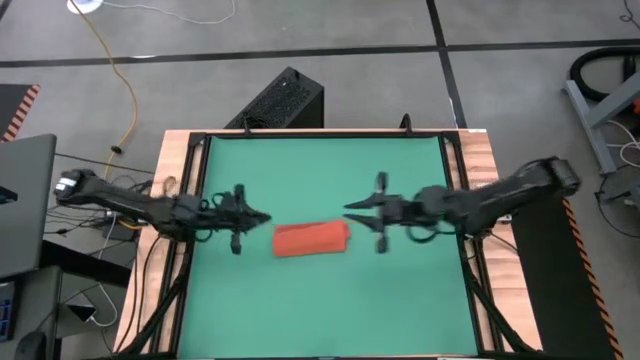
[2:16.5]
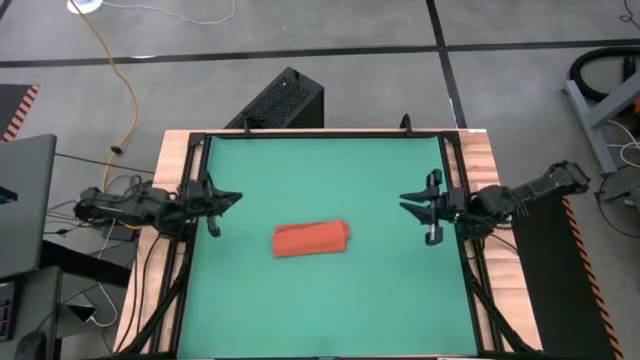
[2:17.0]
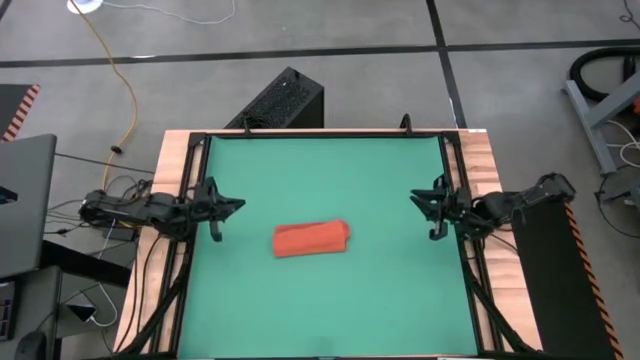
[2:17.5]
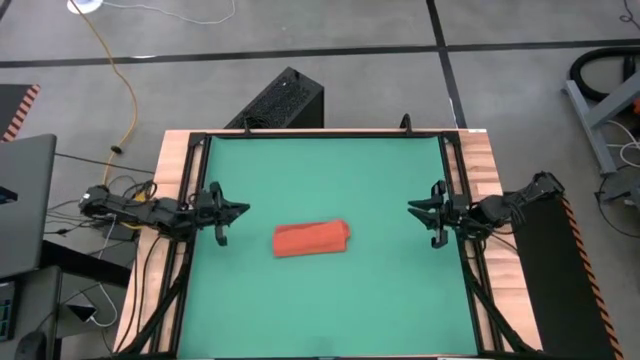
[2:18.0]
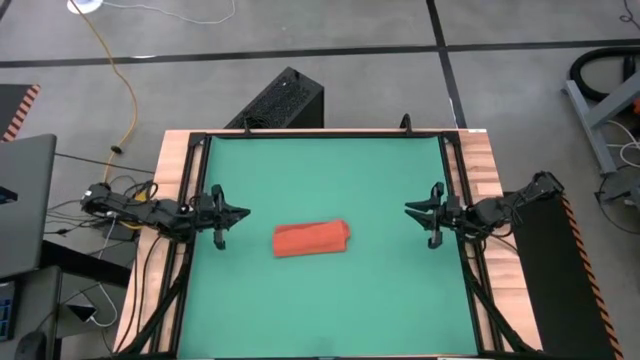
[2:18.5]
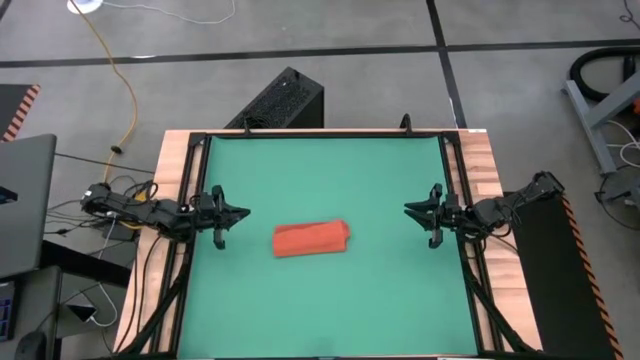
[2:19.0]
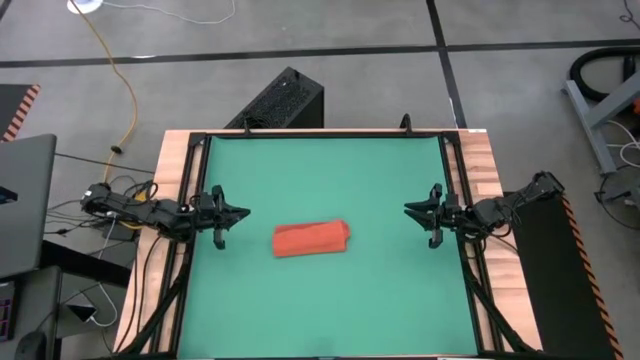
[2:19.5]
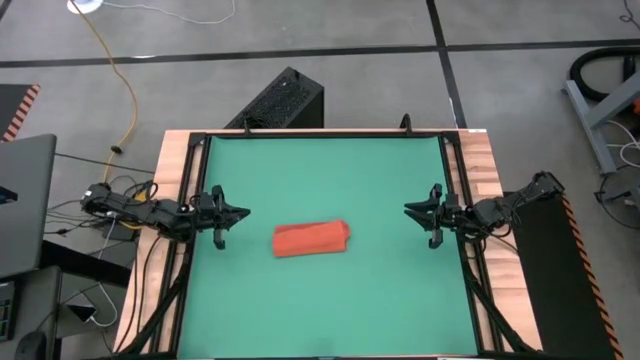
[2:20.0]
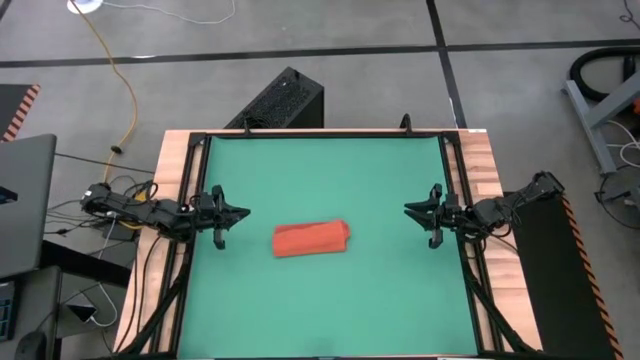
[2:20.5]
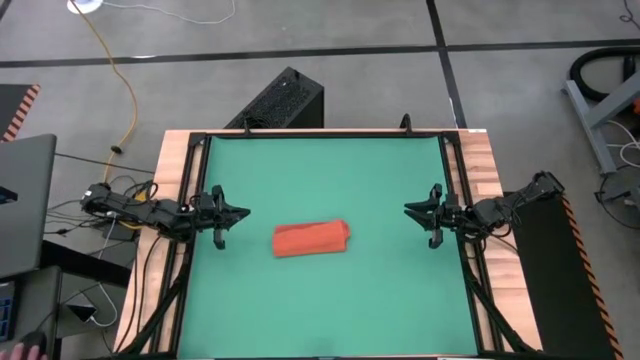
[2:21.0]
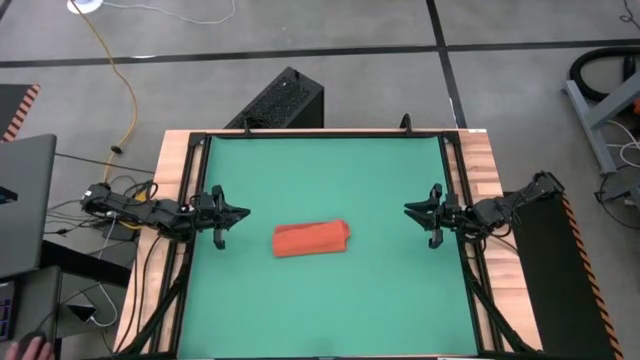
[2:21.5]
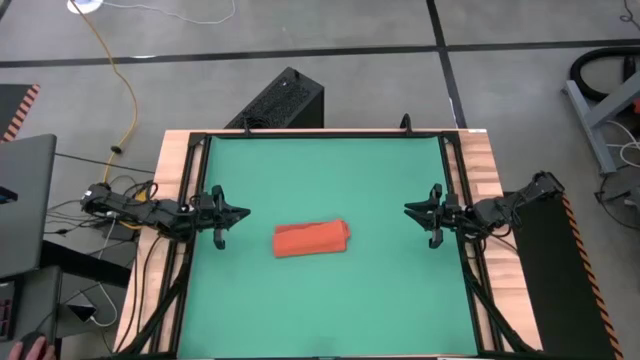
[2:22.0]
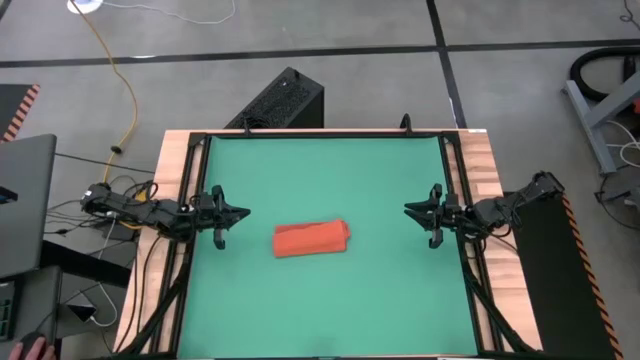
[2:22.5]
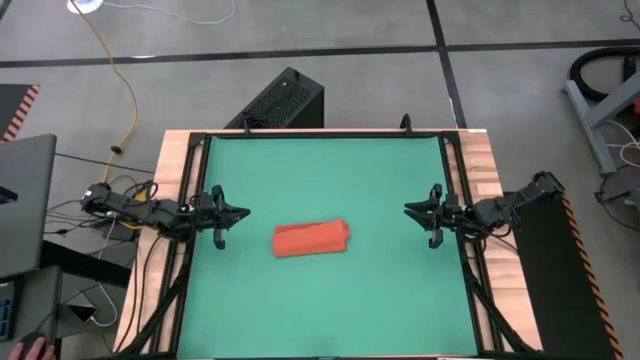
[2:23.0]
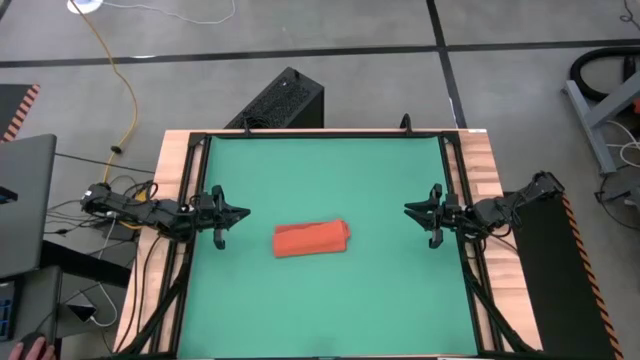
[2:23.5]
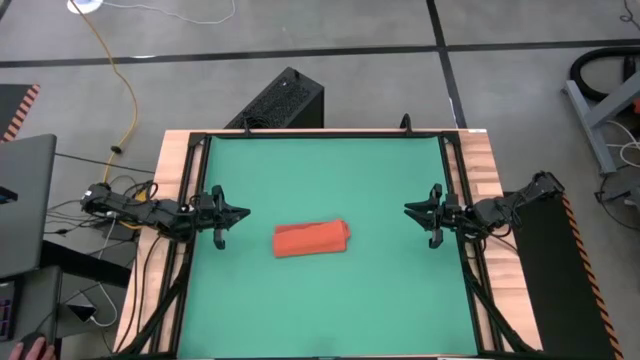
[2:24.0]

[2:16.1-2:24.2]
Task: Roll towel
Return to Home Position

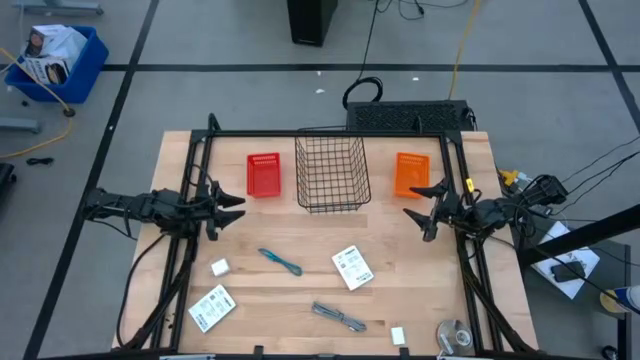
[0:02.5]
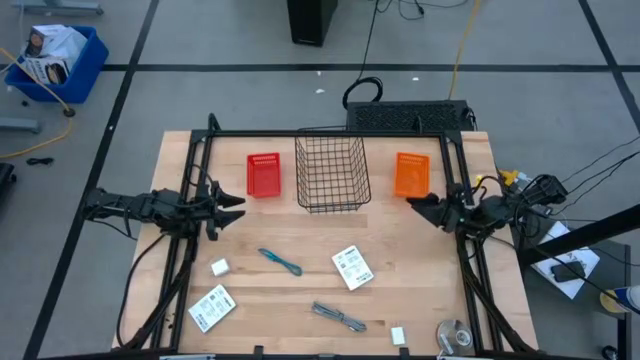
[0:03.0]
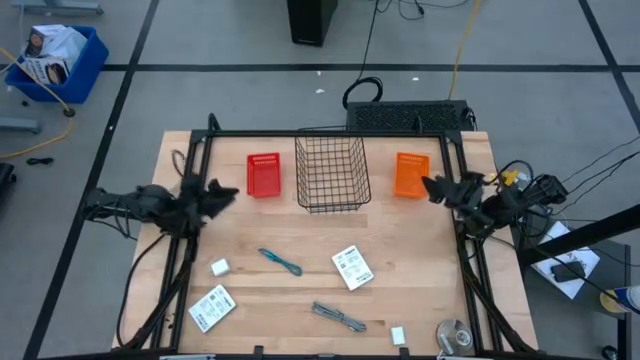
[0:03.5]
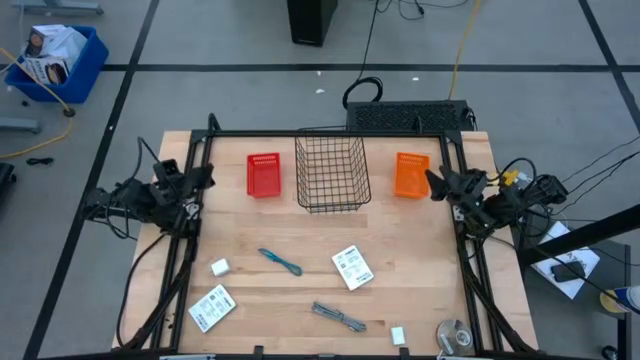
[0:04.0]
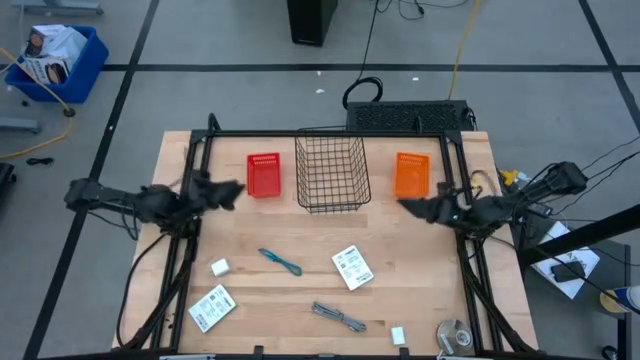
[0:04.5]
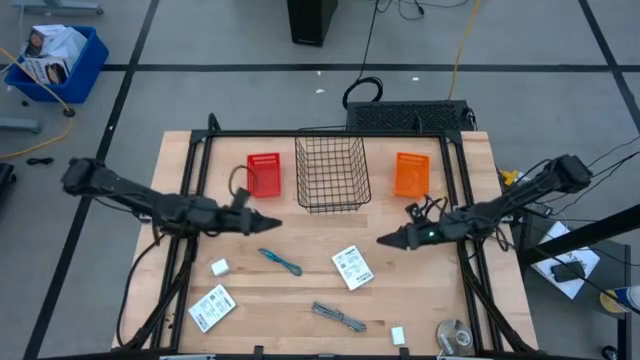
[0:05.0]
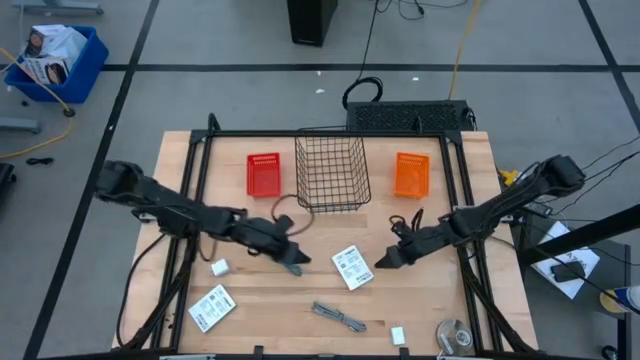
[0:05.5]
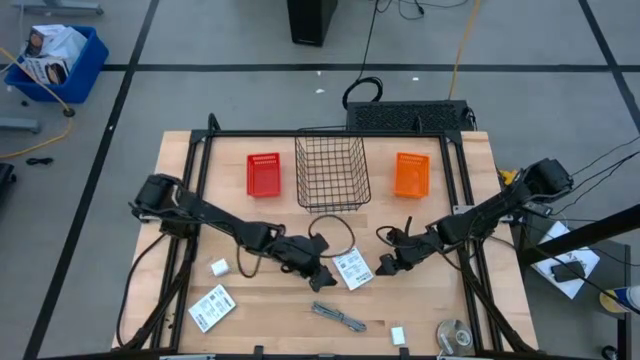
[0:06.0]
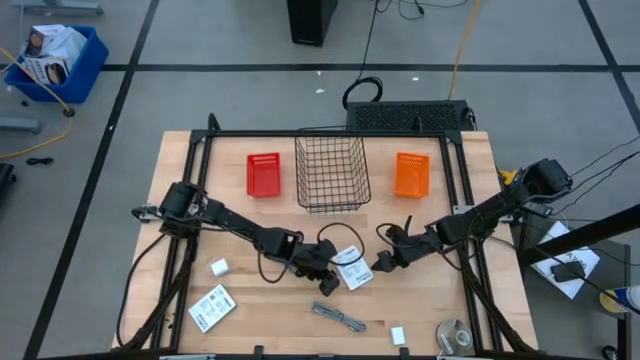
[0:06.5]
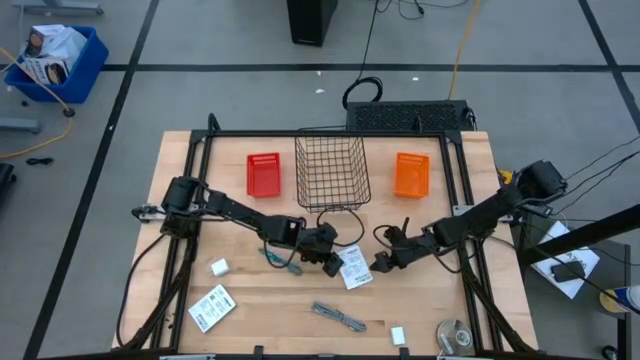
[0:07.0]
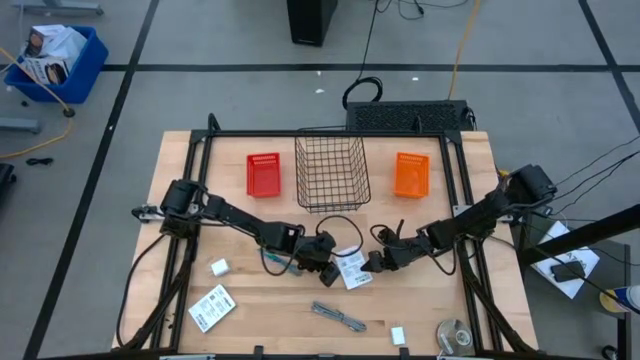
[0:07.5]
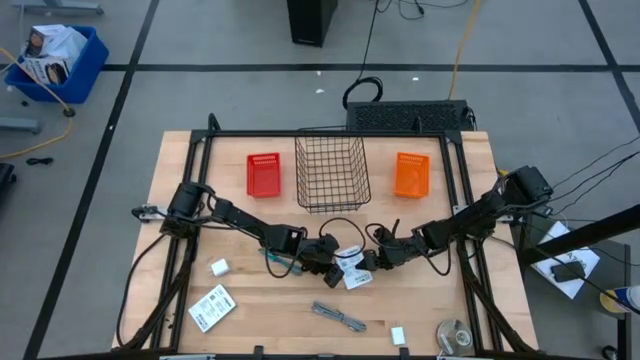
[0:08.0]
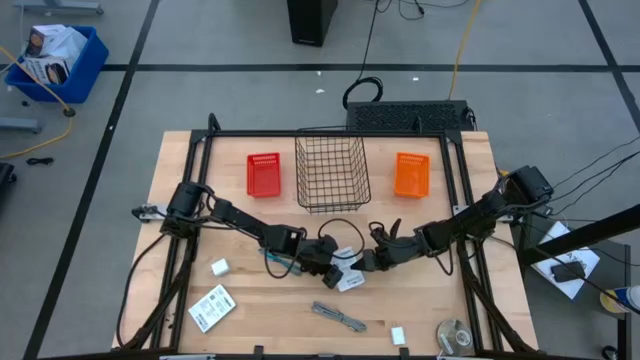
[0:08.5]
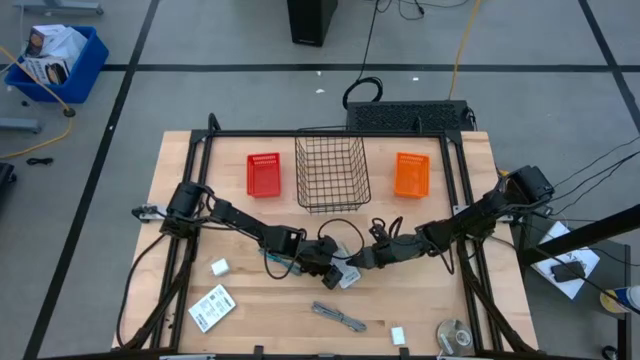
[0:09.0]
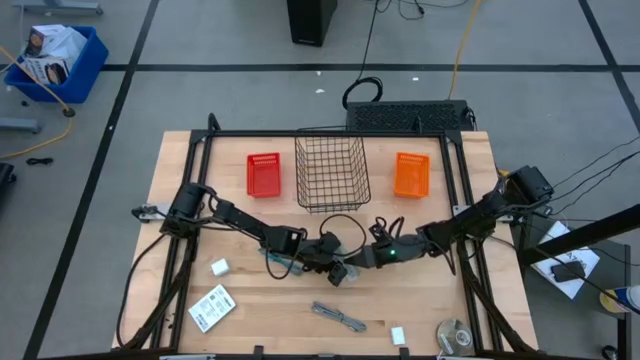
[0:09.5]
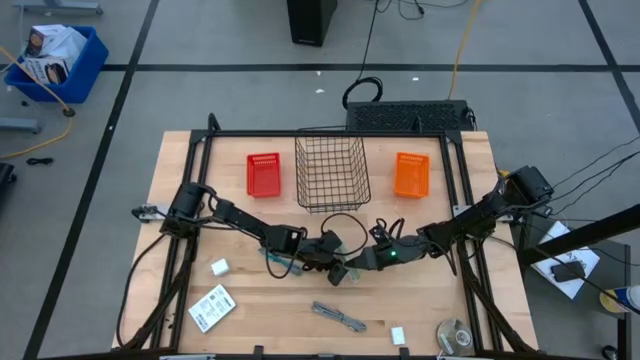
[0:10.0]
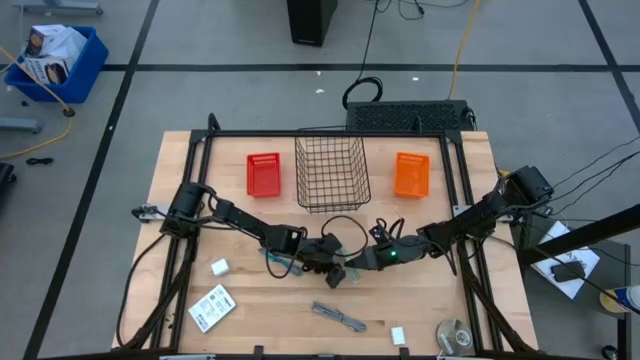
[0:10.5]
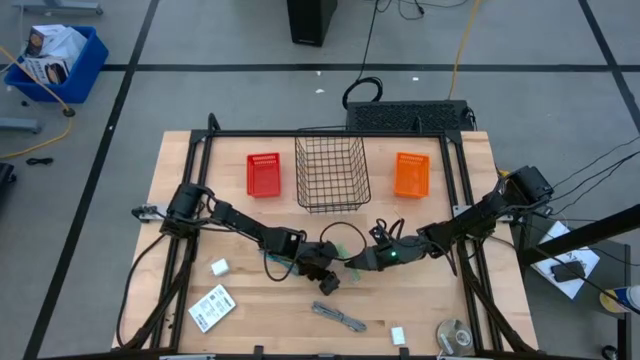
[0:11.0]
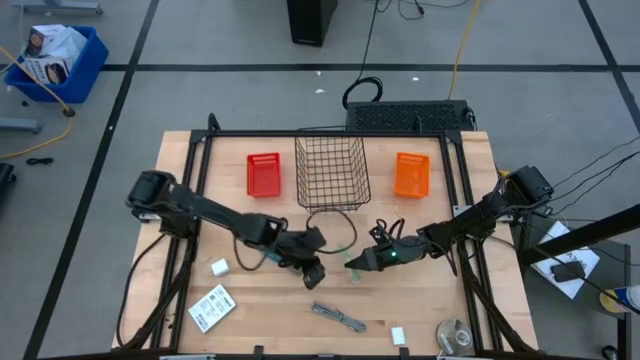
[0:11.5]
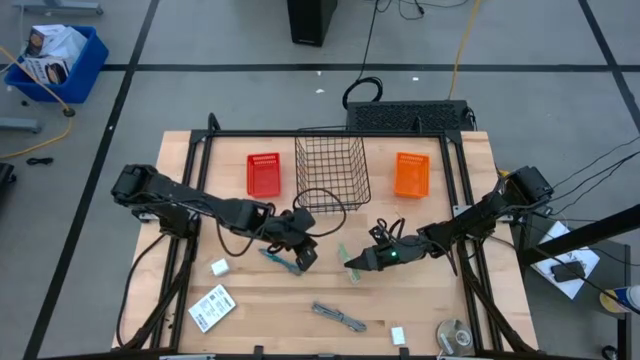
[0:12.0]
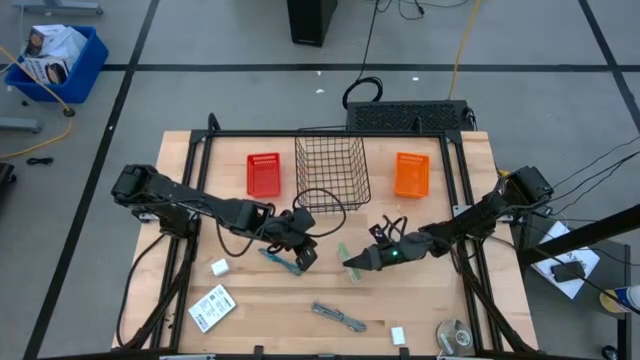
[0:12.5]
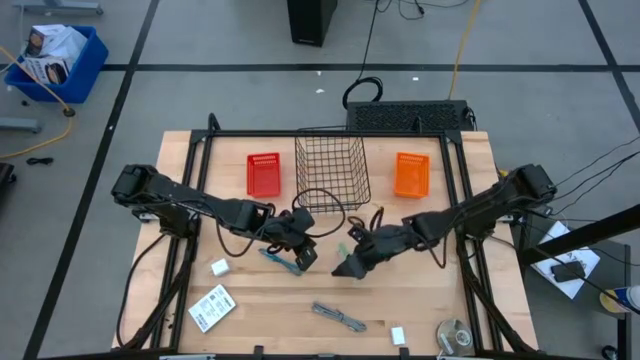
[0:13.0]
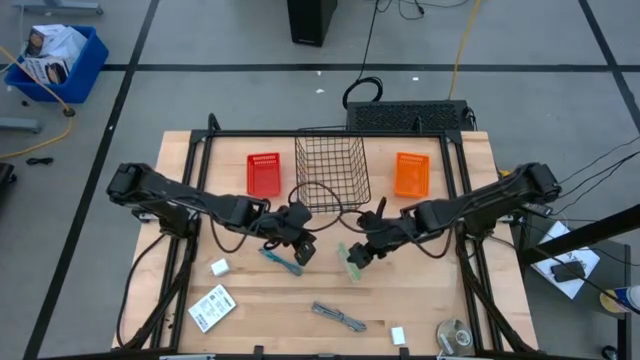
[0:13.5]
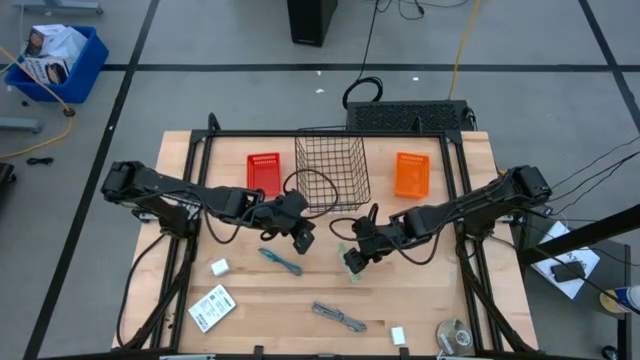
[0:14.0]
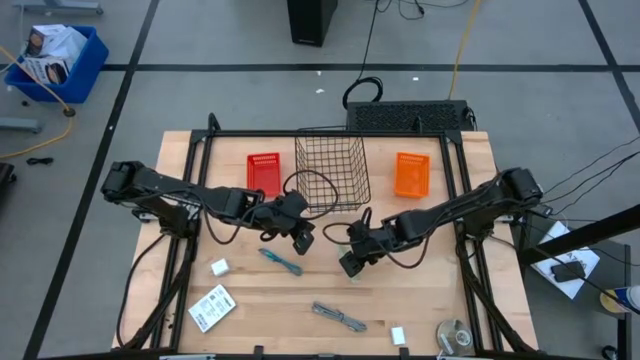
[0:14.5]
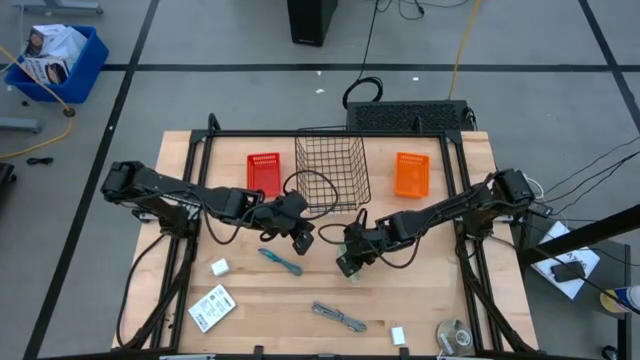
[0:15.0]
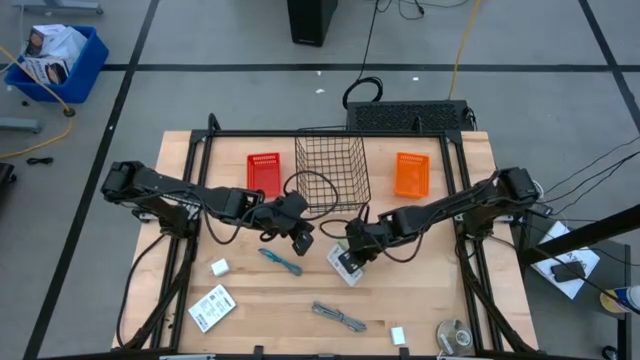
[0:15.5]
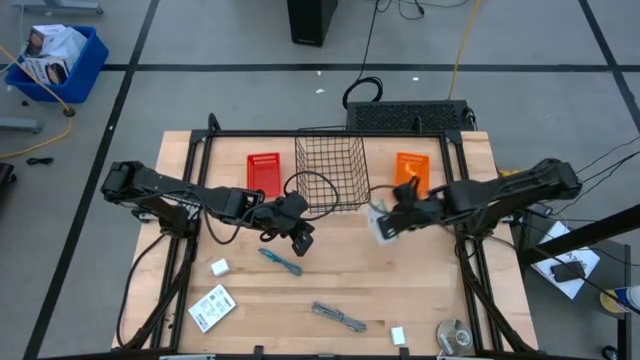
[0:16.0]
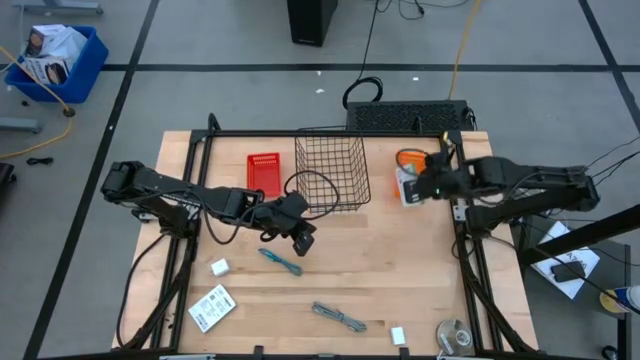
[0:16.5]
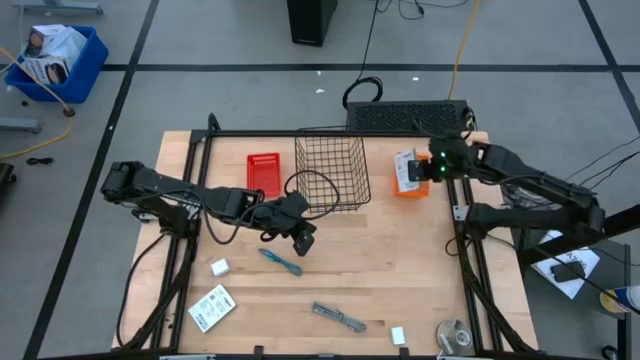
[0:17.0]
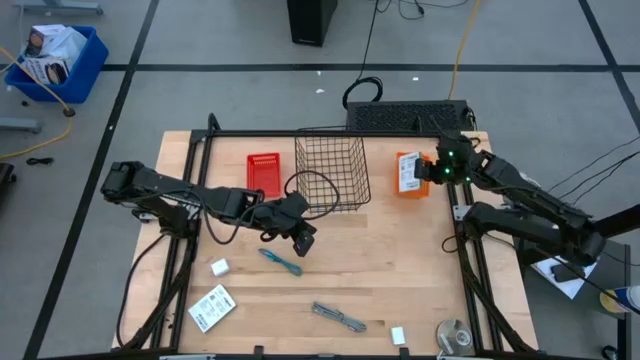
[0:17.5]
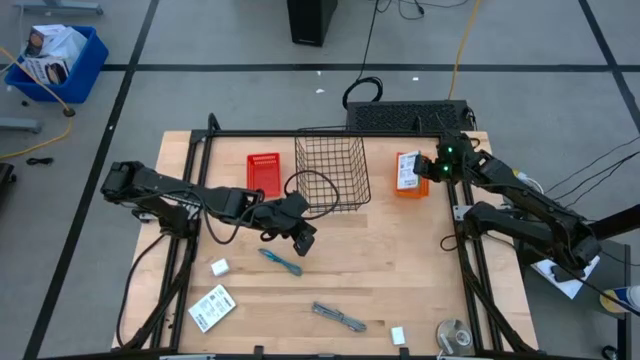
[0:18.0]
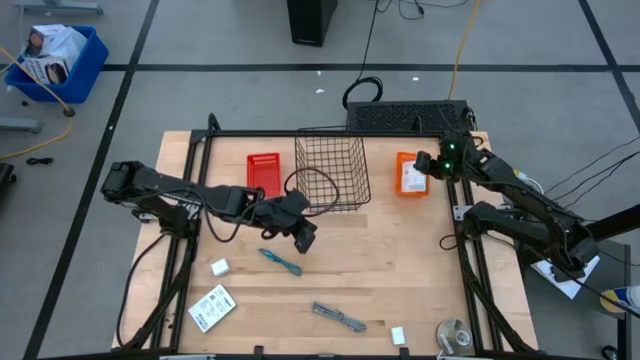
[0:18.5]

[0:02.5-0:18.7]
Task: Pick and place items into bin
Put the right white box into the orange bin
